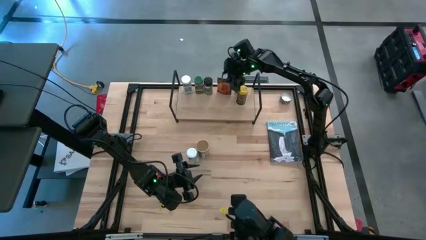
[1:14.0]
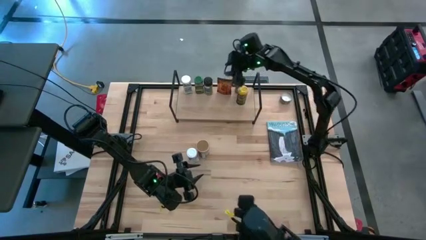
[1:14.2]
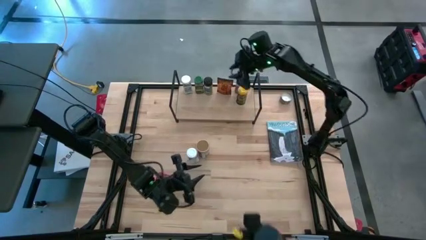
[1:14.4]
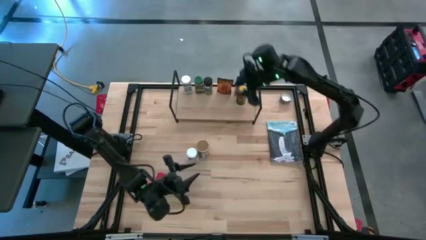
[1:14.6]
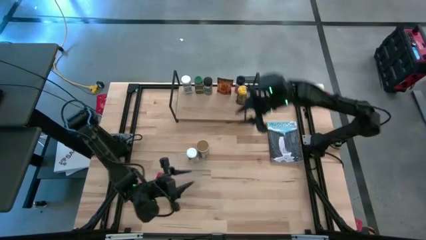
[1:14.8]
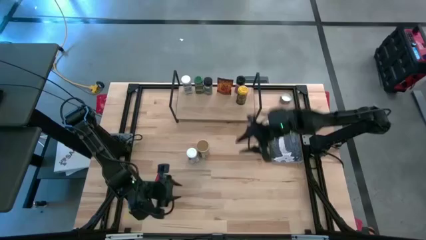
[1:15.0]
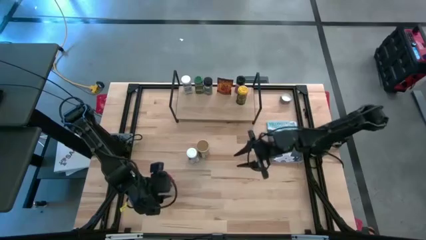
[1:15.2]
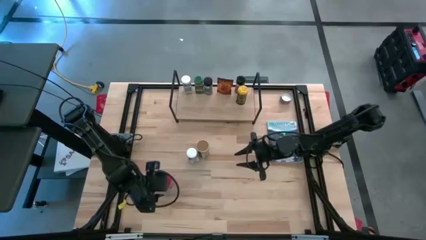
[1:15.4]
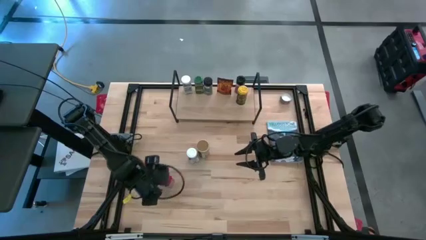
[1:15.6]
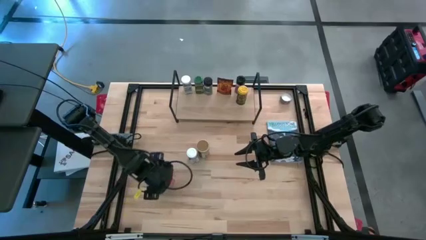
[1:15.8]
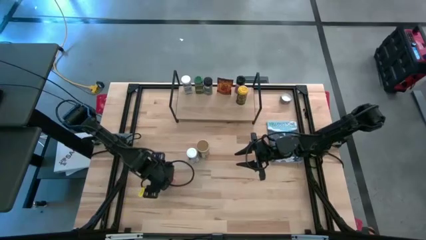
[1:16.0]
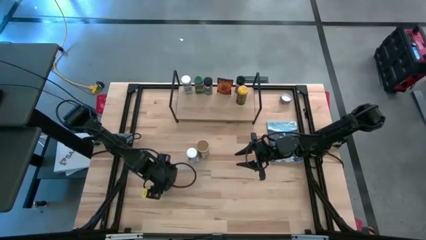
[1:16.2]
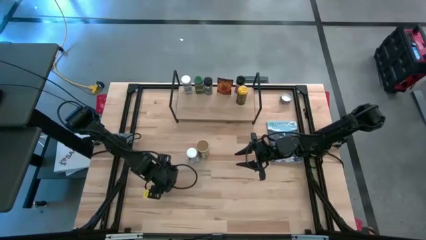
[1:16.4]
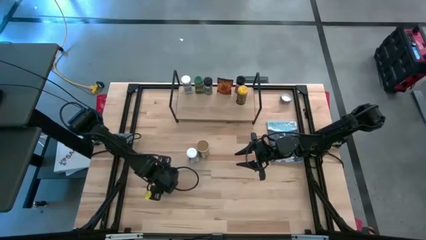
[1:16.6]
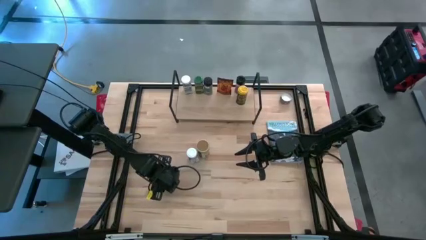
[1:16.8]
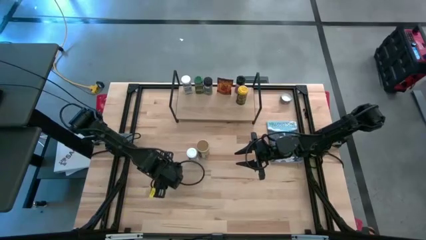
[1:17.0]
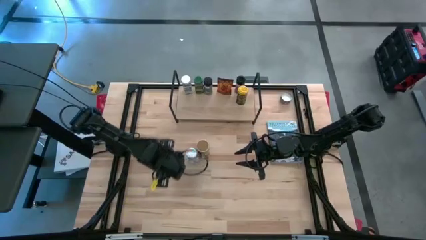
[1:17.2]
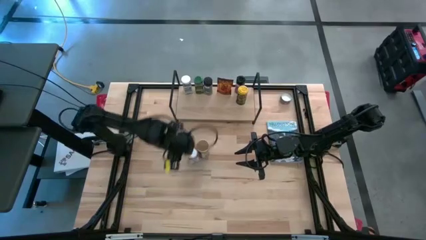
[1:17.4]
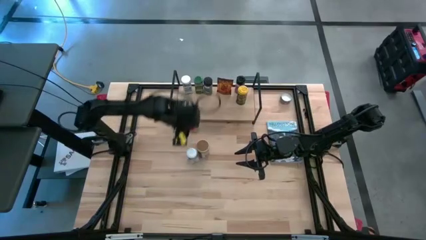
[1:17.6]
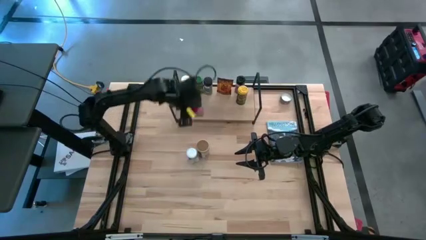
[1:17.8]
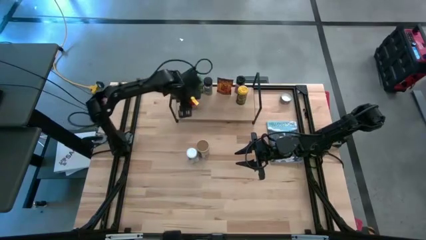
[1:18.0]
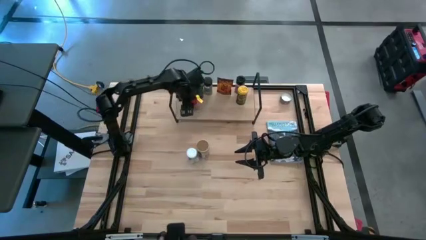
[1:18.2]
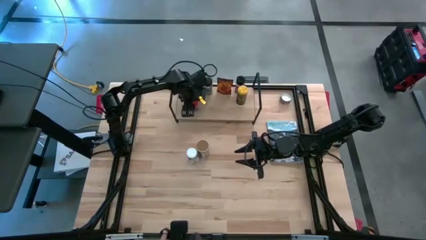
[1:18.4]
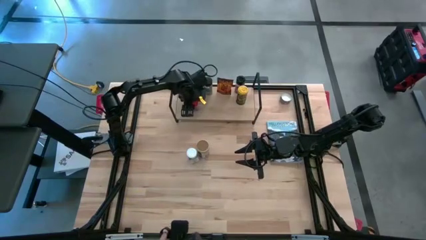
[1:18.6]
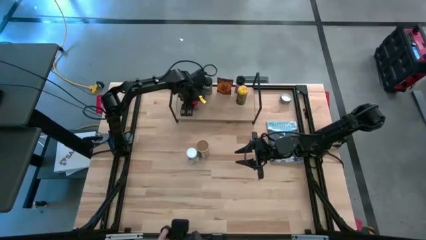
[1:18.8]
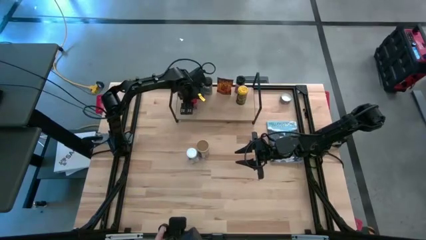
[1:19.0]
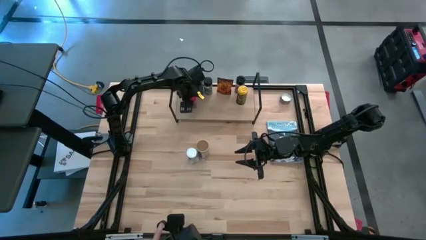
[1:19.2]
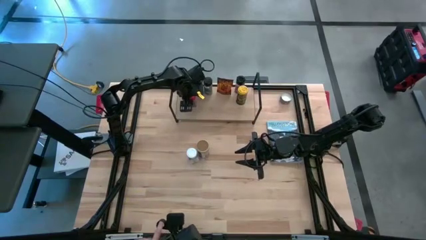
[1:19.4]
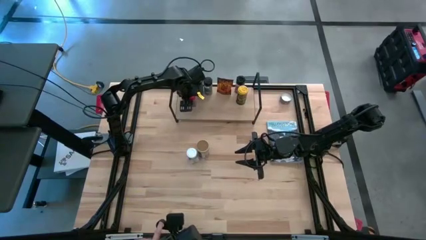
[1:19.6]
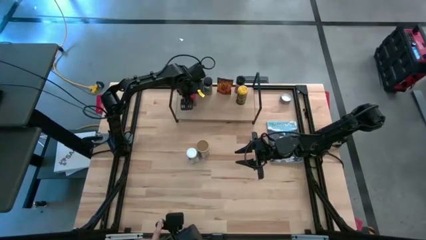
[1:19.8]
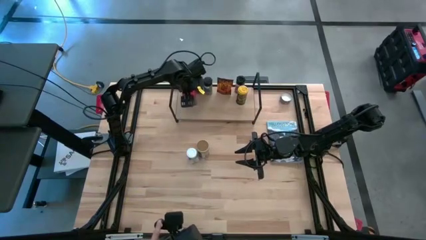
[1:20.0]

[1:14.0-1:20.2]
Task: Shelf spices
Put the red seasoning can on the shelf

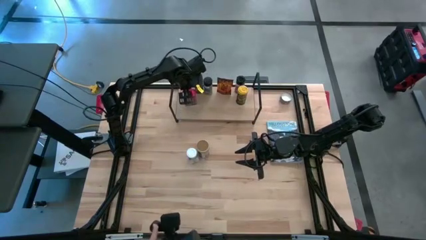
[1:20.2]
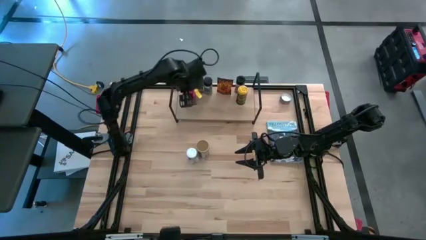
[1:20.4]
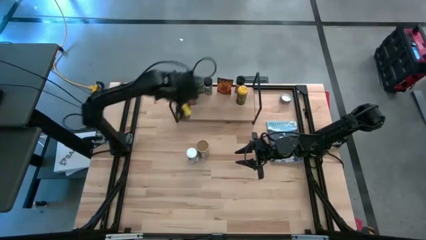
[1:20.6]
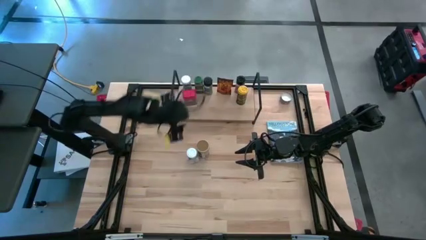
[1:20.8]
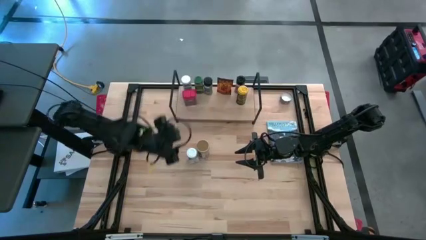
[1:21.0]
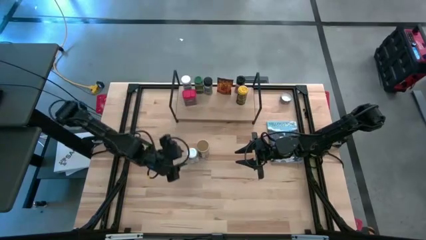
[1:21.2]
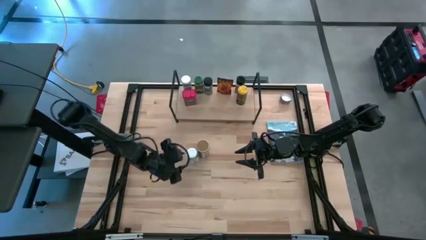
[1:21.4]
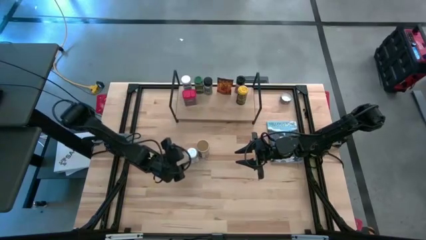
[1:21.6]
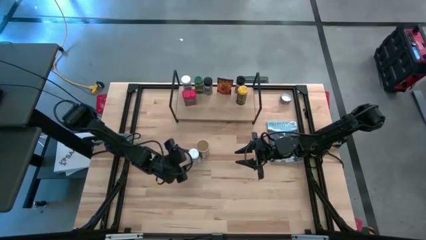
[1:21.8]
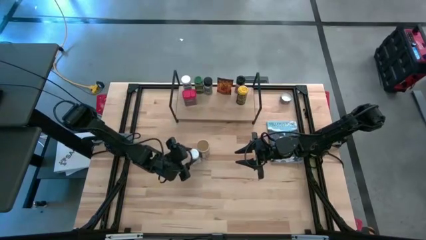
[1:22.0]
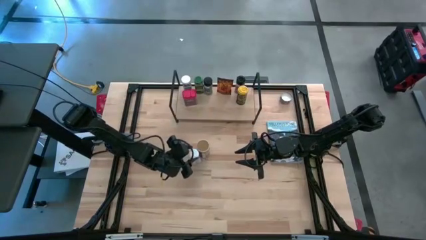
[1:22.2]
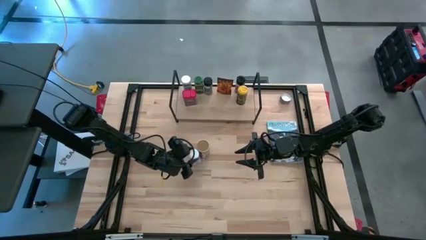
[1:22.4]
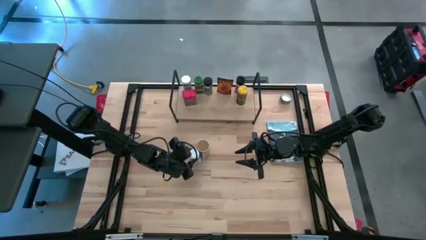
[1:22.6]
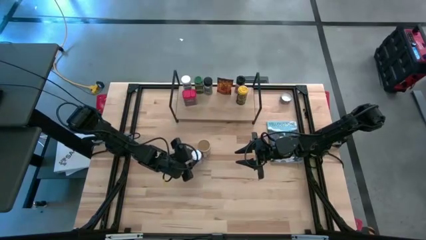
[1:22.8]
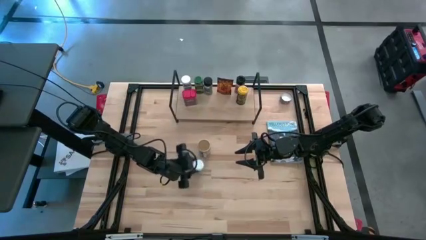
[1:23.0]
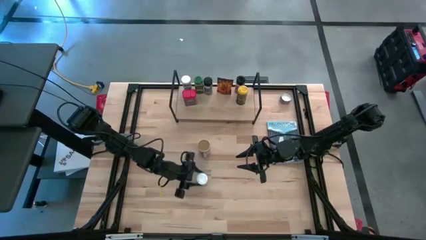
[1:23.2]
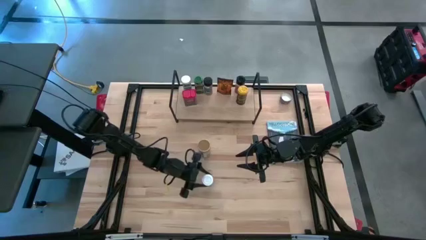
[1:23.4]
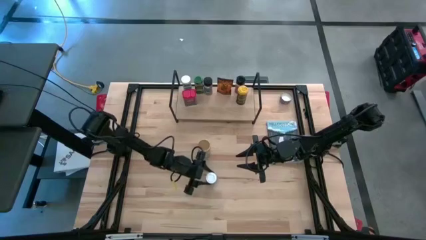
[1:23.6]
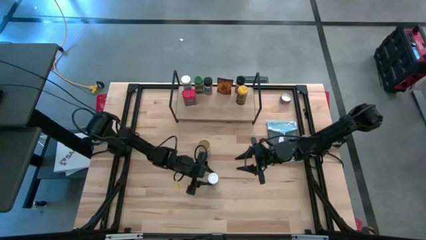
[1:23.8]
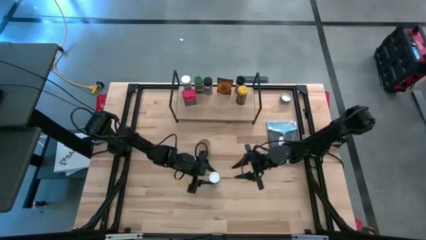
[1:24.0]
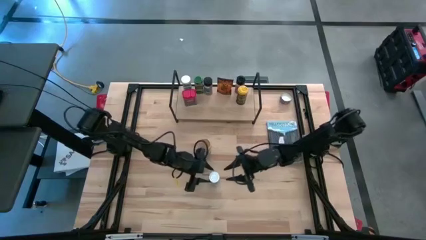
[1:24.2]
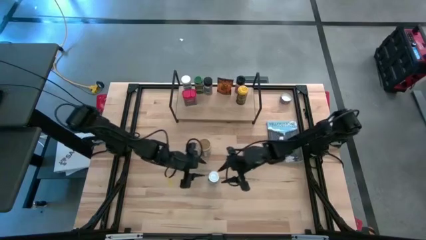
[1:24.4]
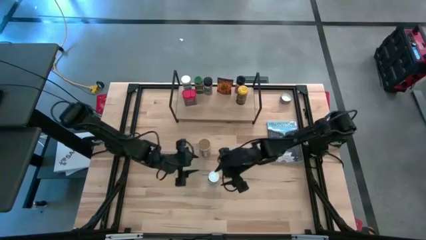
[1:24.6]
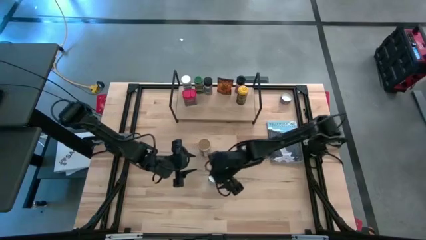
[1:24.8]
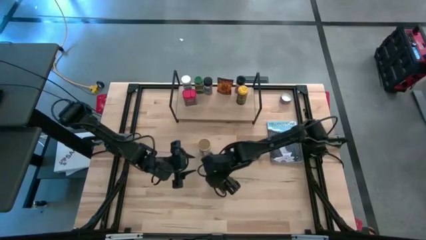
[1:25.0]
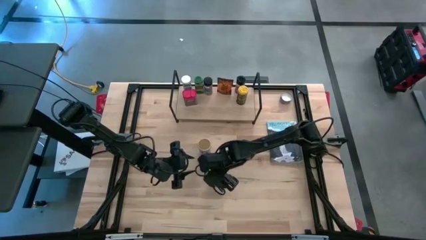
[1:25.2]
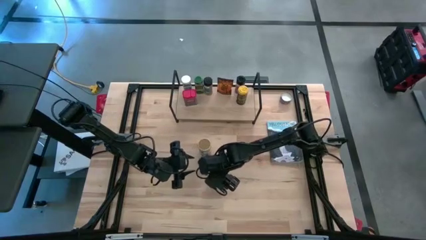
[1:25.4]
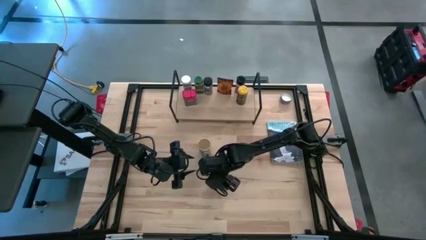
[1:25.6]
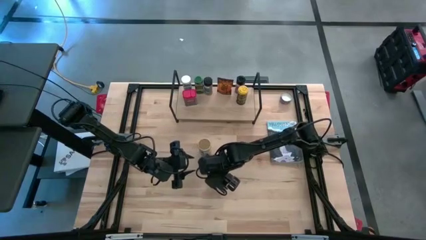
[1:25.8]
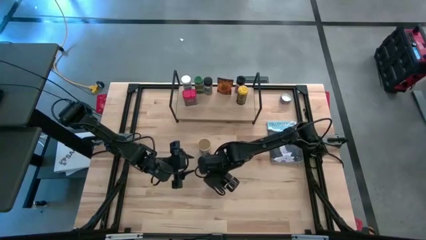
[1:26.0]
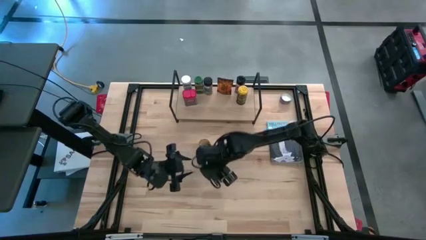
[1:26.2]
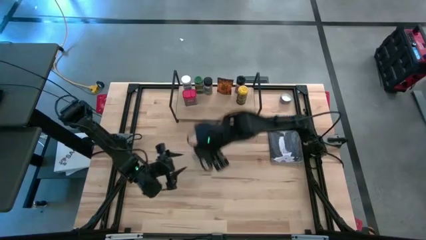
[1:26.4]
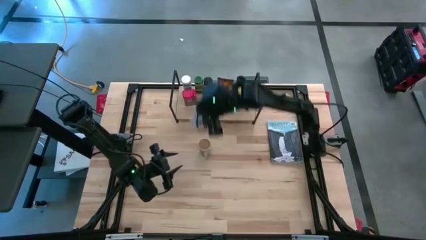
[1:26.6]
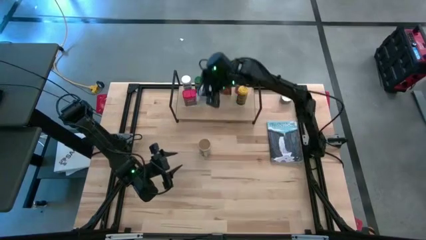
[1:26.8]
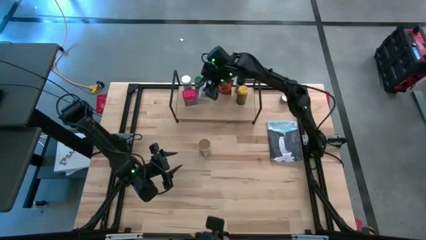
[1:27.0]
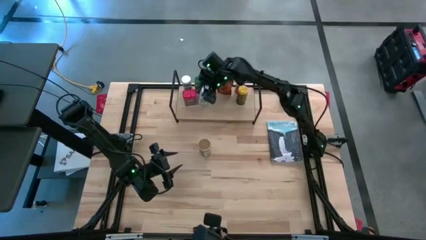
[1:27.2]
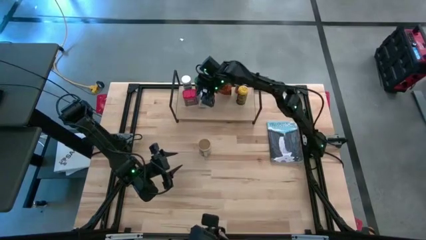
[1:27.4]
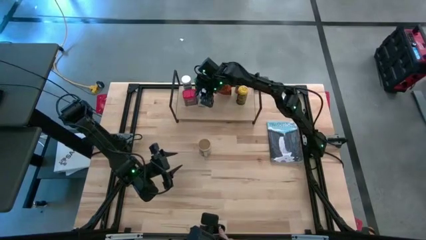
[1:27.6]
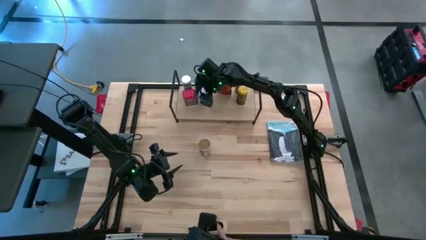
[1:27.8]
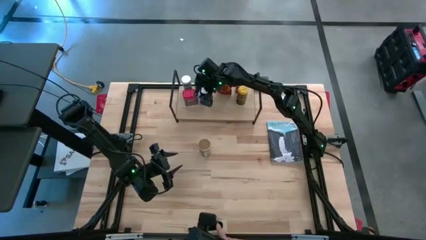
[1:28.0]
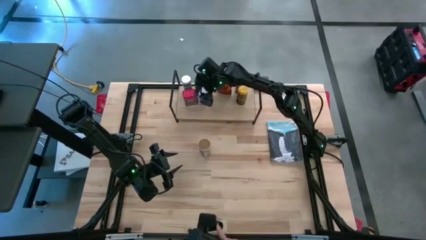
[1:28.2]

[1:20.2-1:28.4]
Put the white seasoning bottle on the shelf
